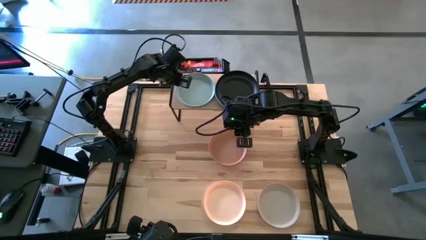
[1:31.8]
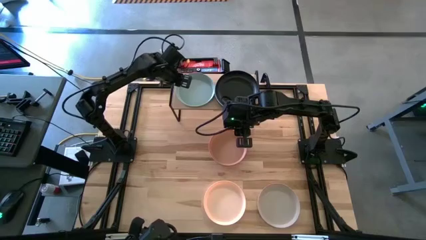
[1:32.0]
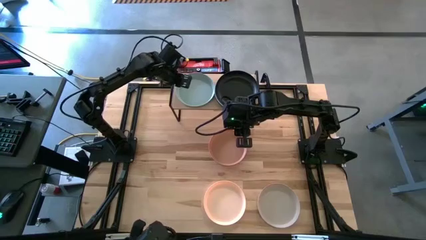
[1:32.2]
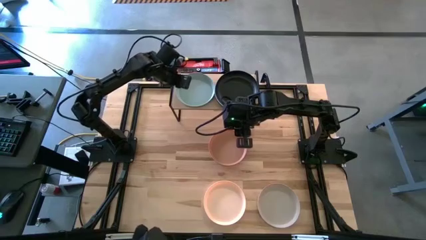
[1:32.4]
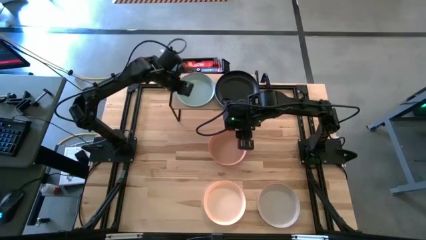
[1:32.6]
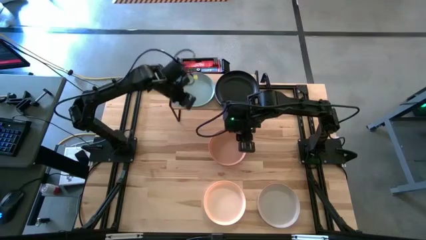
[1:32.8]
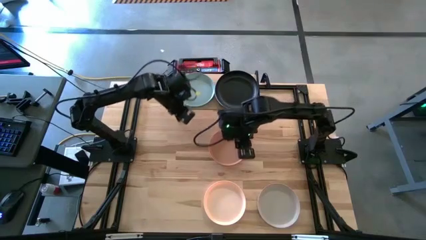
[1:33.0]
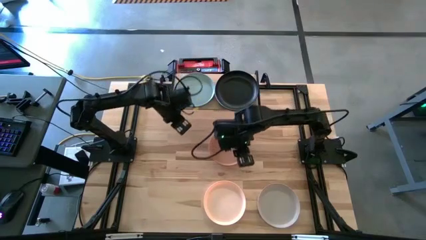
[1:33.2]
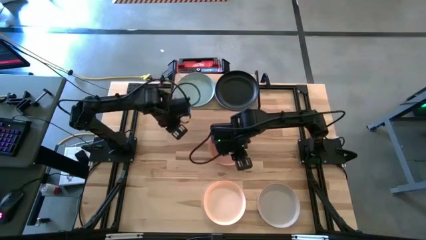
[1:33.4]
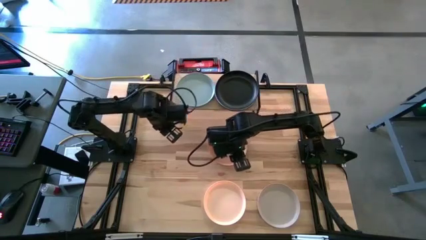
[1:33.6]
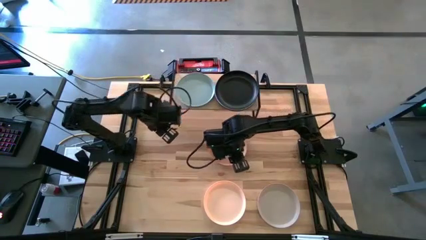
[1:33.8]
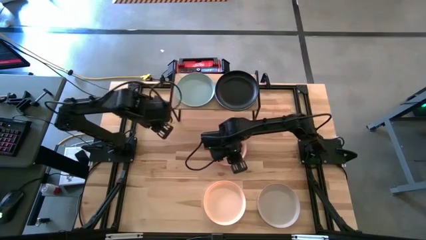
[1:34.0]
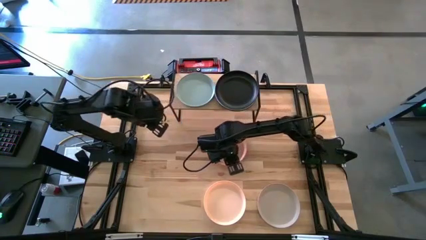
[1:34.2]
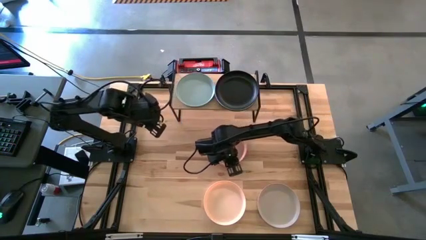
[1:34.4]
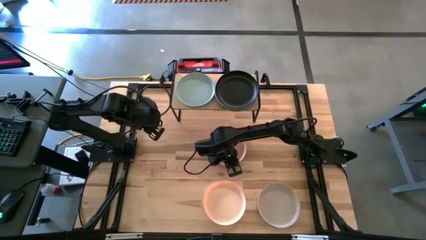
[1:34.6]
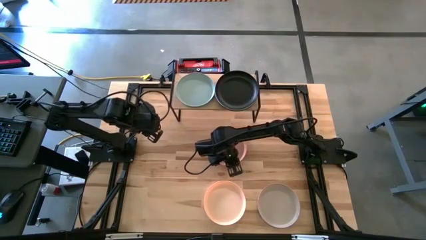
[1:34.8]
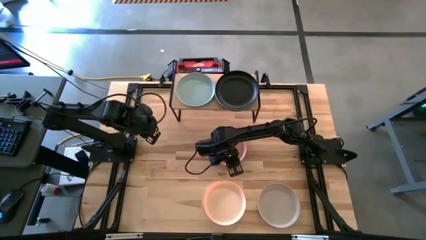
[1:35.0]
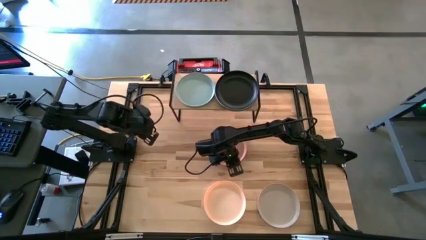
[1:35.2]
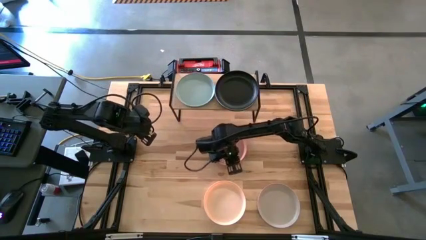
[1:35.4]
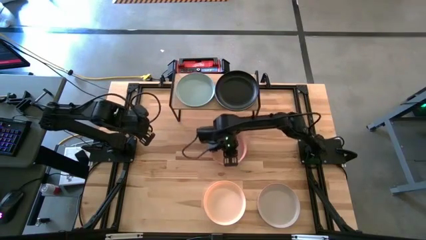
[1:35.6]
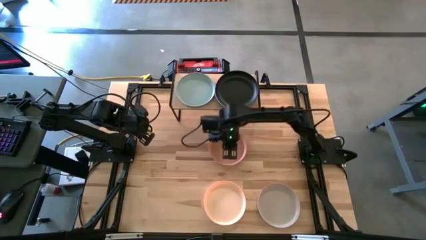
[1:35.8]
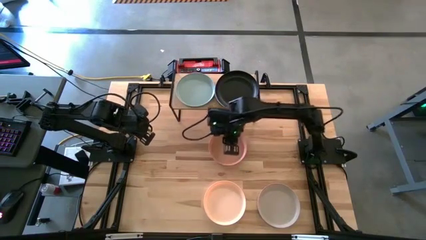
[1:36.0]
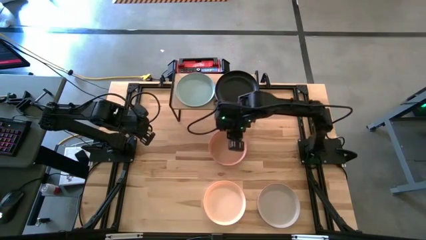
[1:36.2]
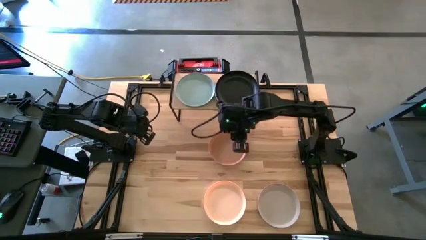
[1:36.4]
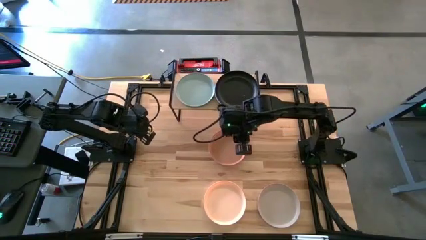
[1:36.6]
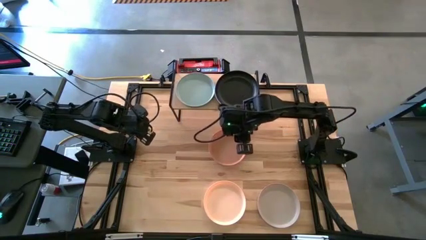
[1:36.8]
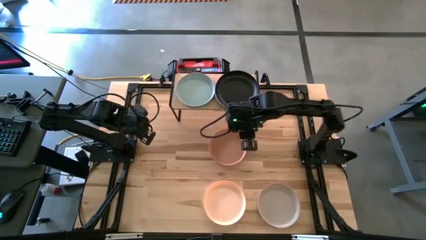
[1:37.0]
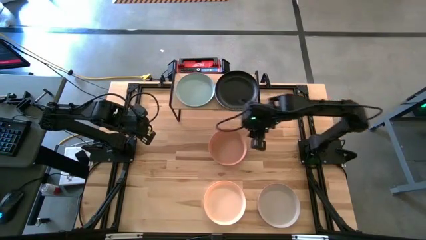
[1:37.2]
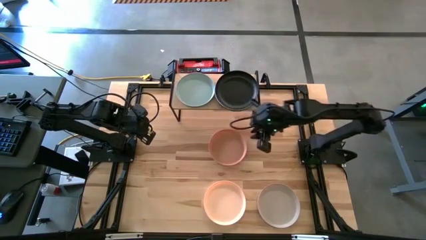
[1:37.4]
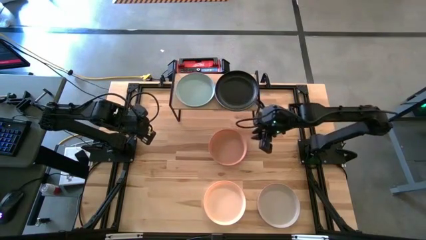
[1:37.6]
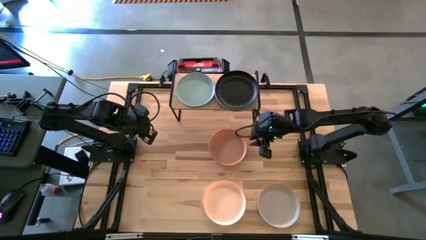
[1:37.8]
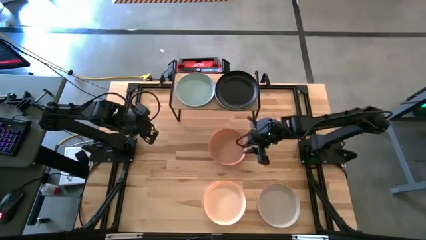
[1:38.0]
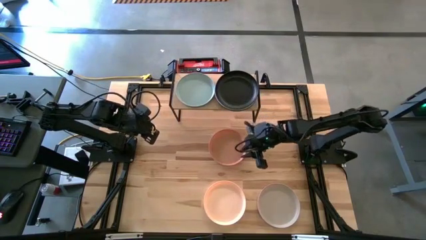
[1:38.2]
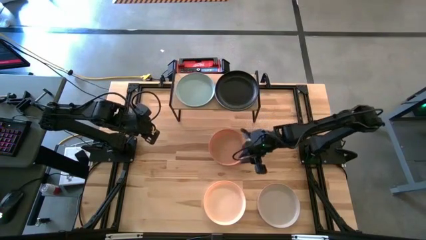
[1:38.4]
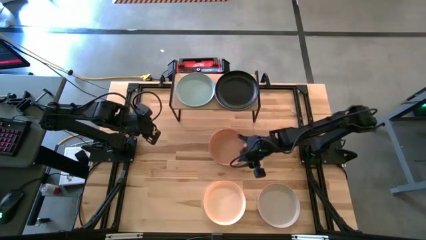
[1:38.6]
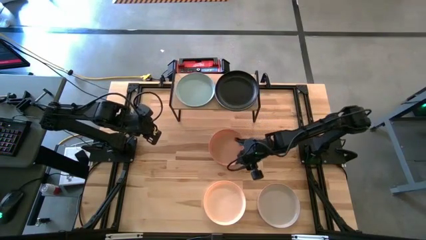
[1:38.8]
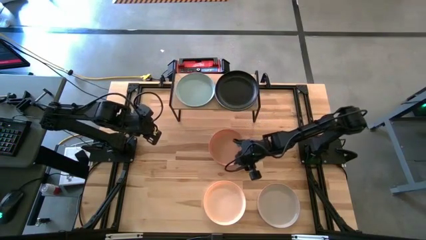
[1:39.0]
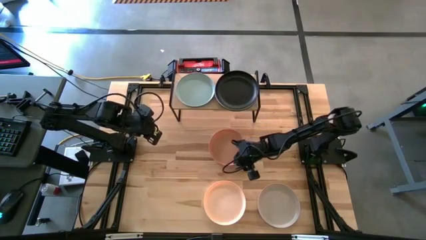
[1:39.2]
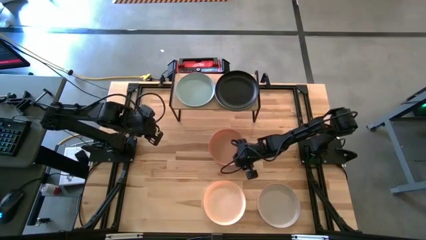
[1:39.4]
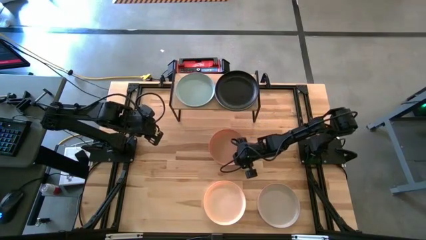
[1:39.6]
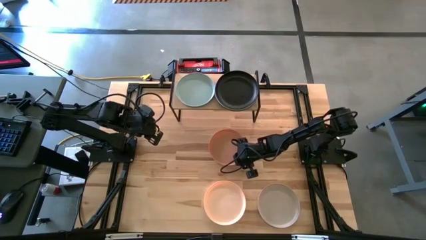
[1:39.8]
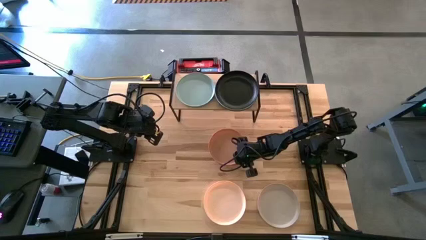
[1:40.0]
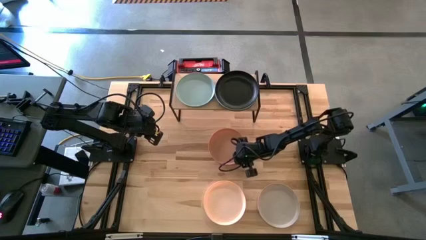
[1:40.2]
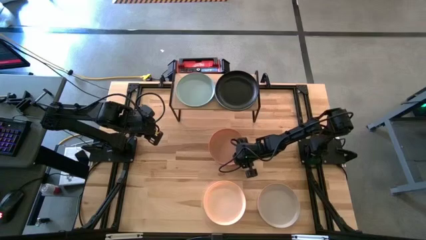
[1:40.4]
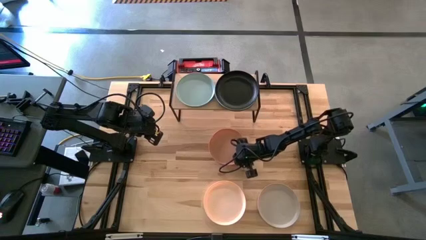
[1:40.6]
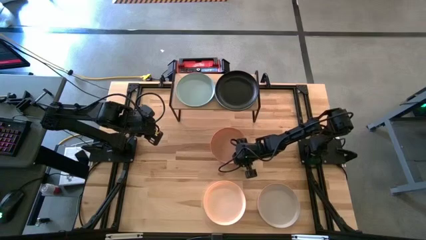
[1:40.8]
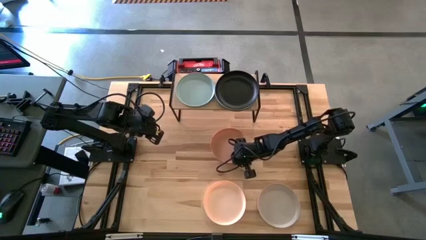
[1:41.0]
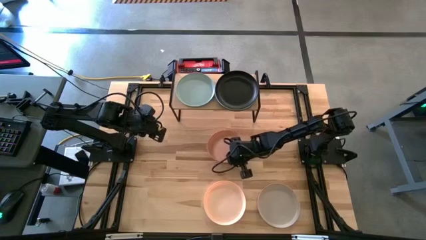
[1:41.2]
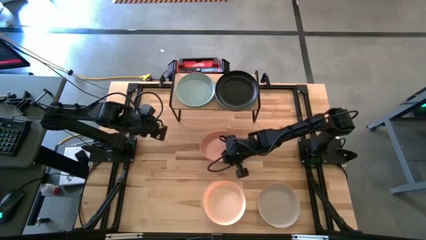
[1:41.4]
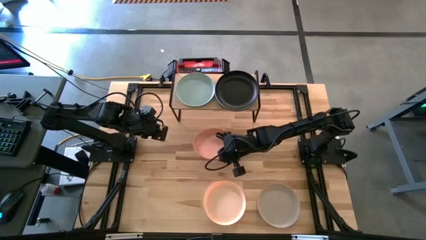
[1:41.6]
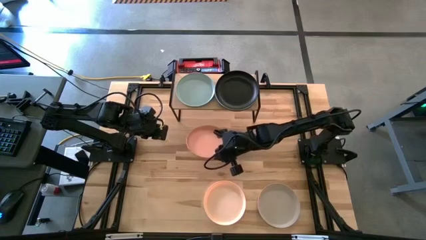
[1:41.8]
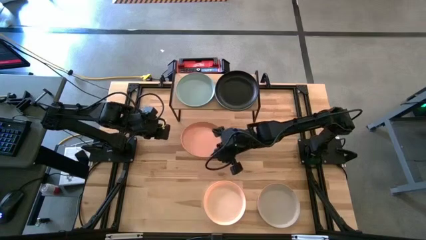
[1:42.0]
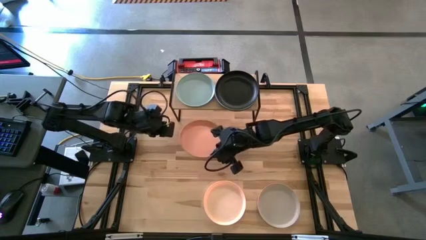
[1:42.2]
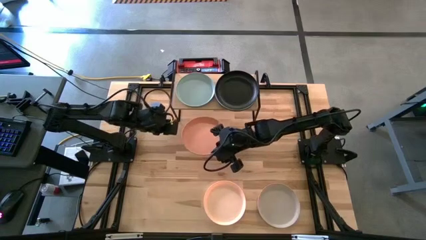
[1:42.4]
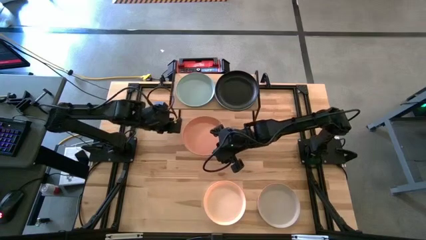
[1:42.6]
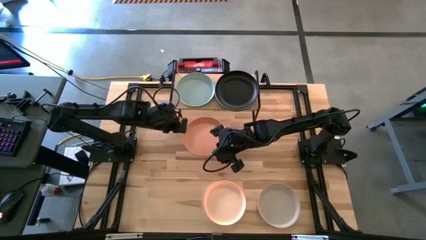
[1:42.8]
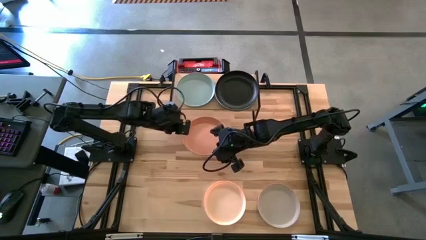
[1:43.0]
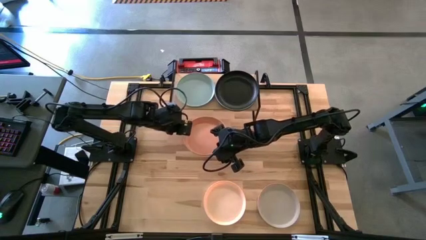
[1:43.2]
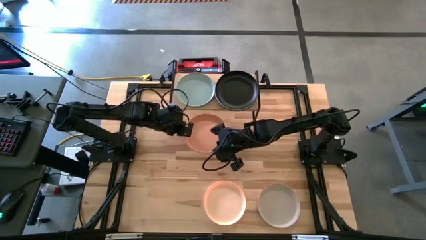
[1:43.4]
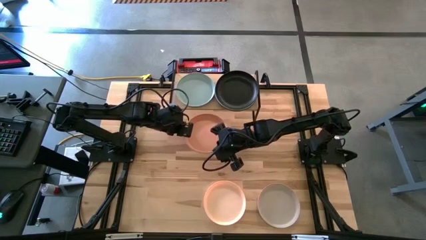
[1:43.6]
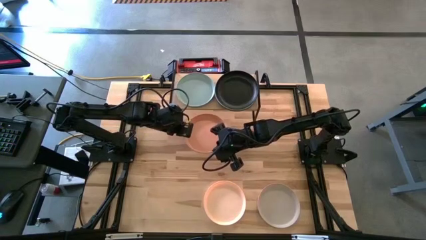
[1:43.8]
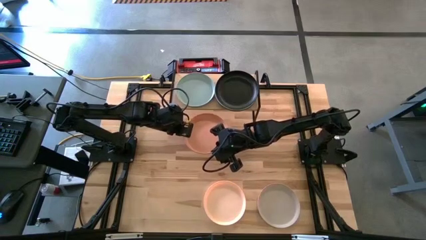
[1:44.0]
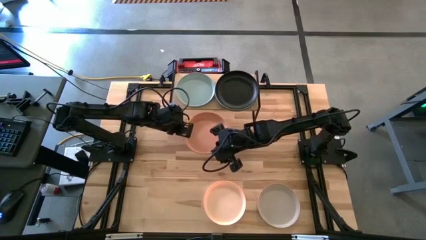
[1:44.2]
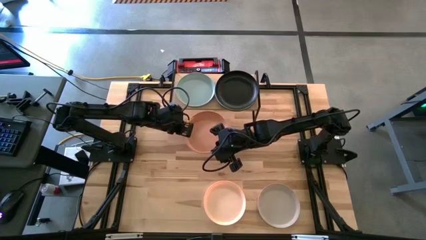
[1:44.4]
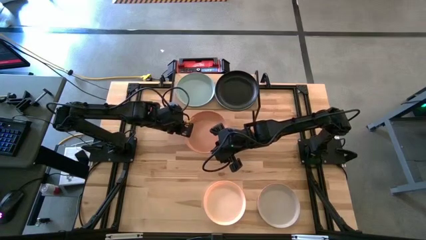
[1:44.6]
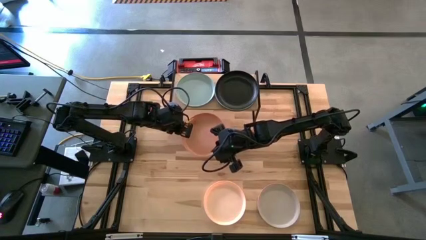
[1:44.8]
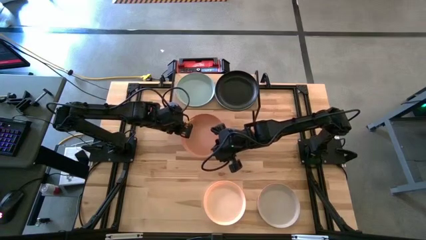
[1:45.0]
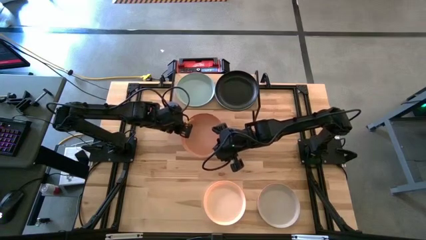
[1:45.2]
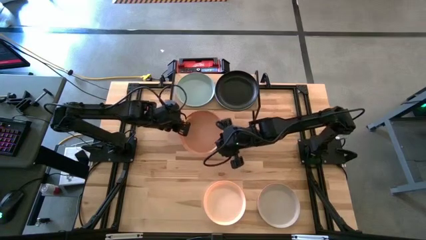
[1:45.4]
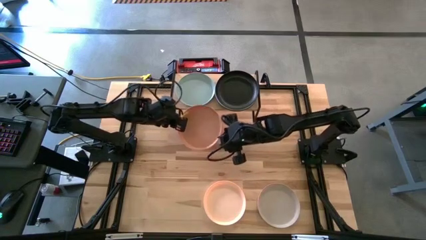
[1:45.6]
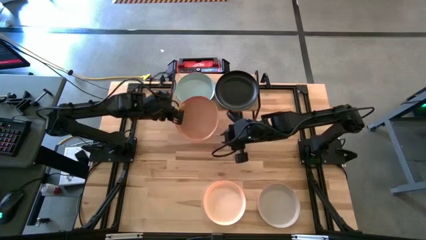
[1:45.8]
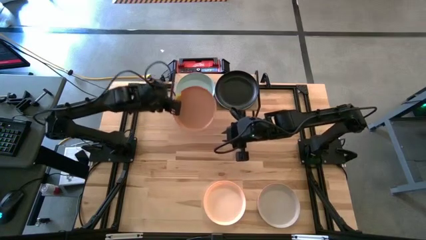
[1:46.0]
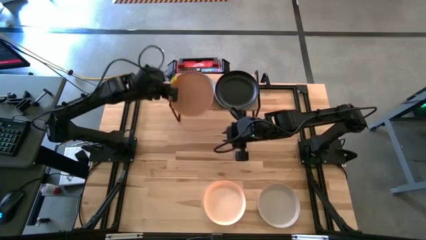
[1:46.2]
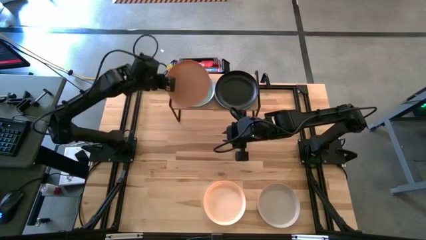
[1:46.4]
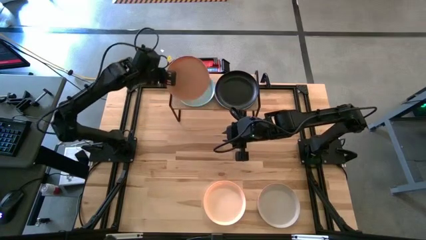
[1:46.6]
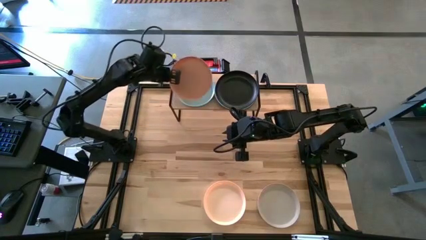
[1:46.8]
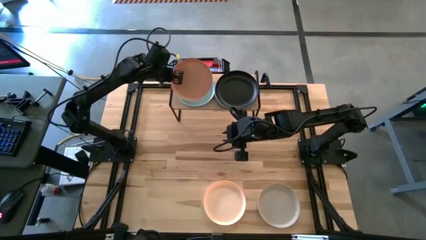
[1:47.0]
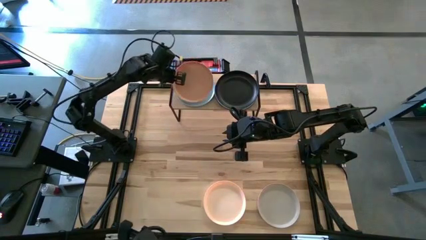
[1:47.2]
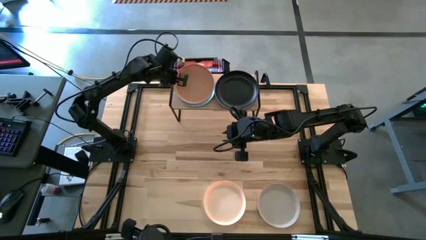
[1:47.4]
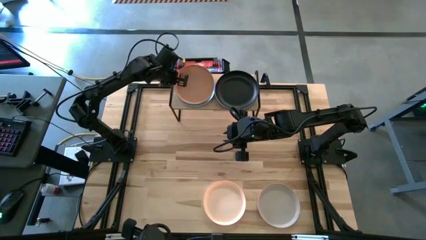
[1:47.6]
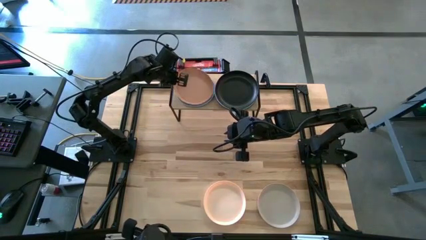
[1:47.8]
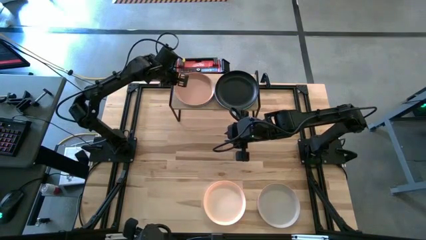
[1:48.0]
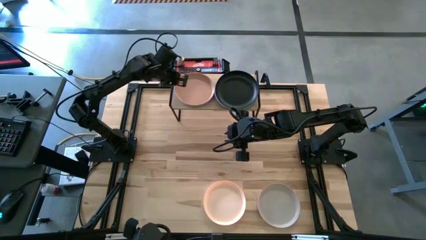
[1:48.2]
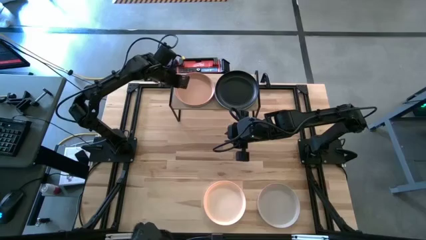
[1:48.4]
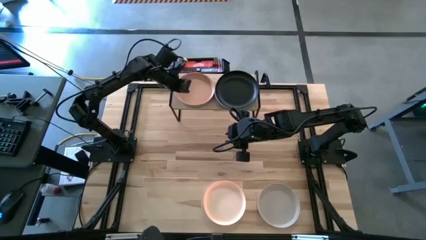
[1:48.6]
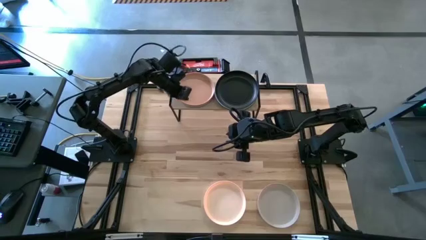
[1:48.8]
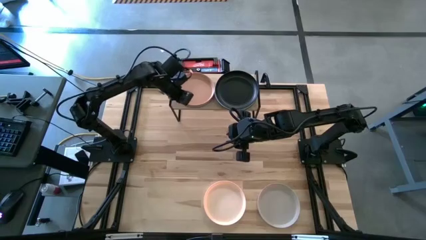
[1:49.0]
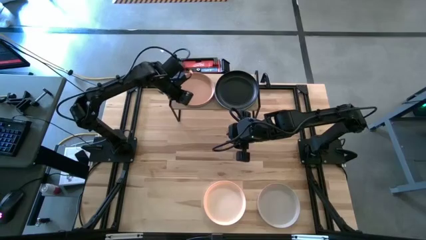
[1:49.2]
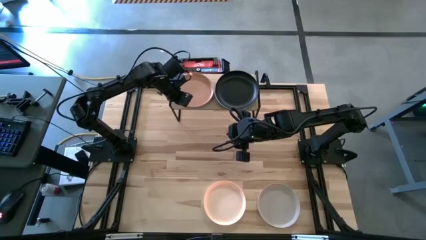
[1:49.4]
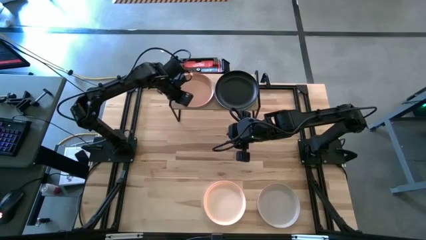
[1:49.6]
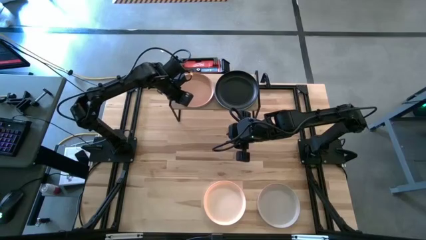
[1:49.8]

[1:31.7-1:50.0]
Task: Place and stack plates onto a shelf
Stack the orange plate on the top of the green plate on the shelf
